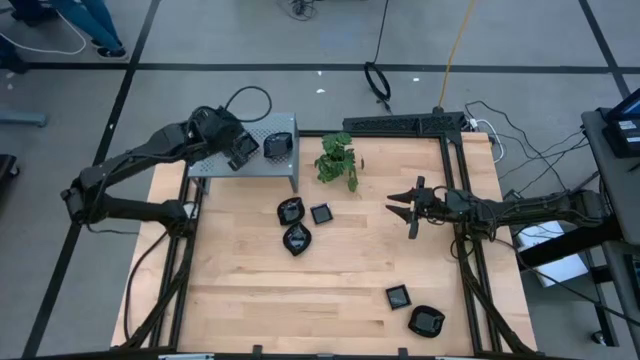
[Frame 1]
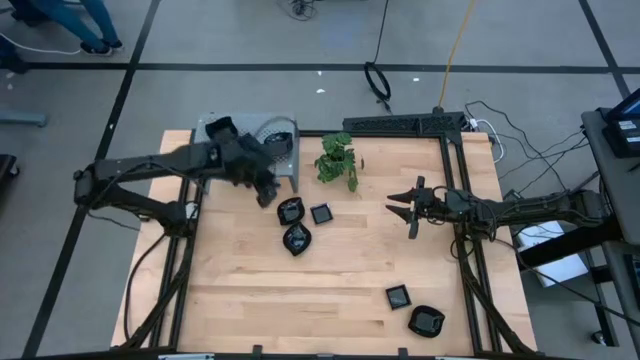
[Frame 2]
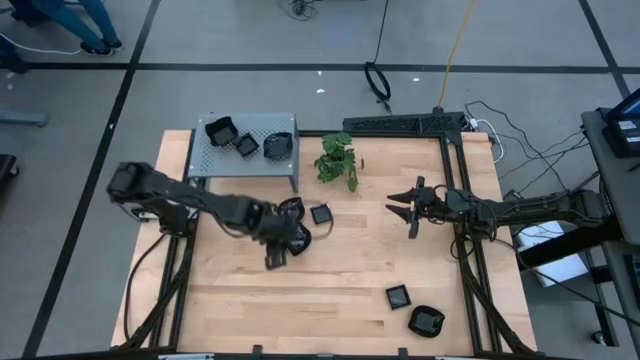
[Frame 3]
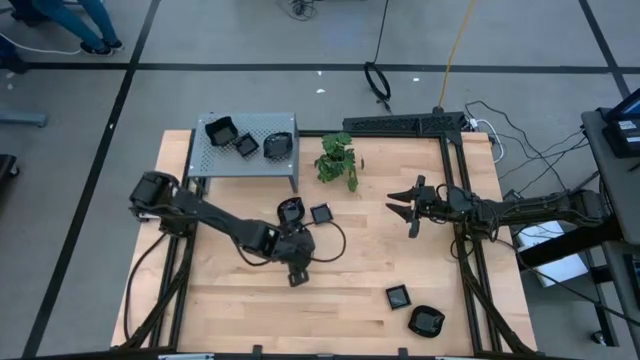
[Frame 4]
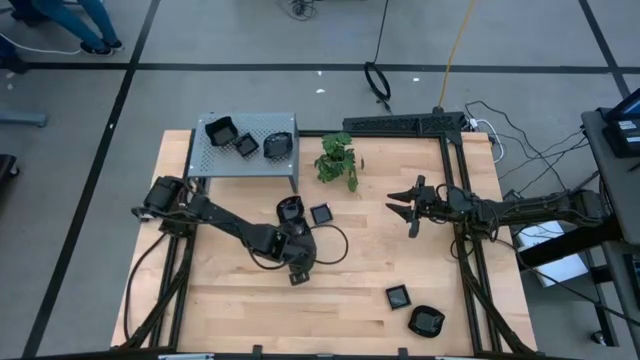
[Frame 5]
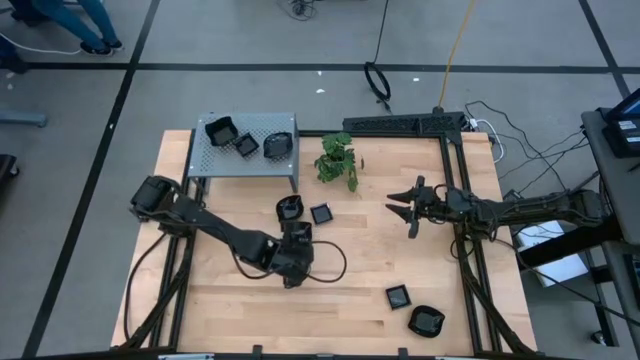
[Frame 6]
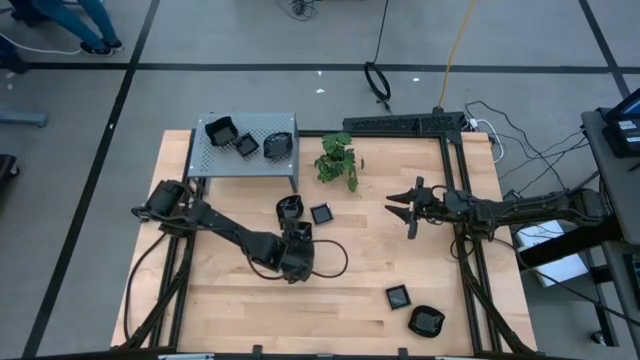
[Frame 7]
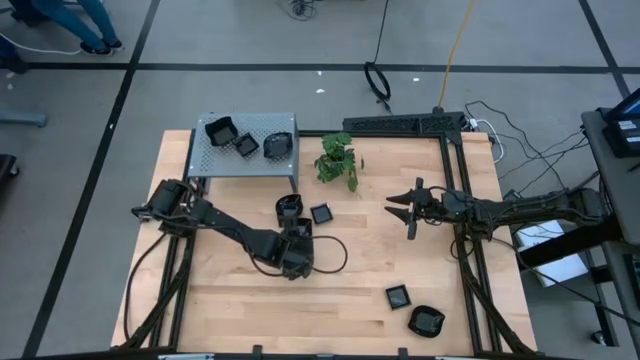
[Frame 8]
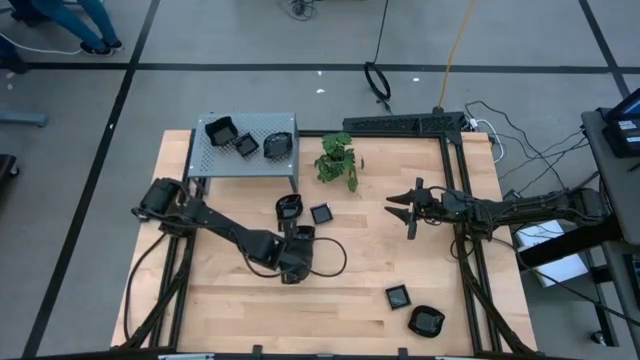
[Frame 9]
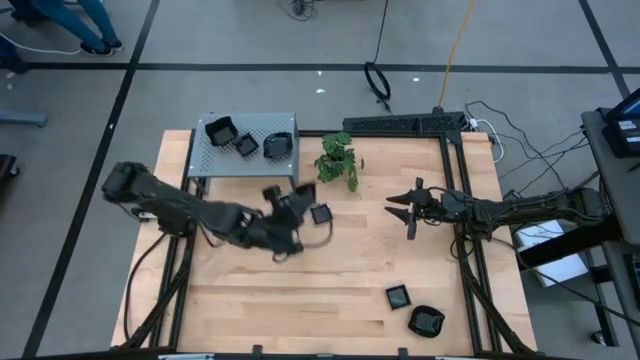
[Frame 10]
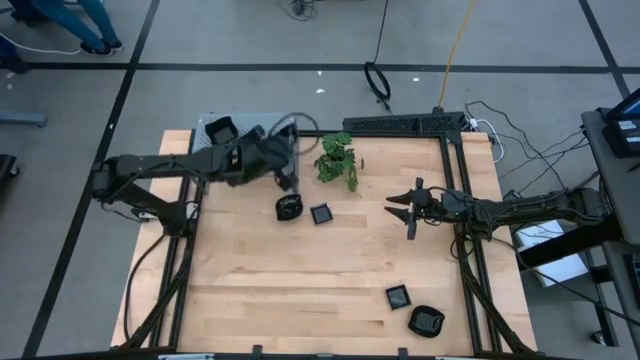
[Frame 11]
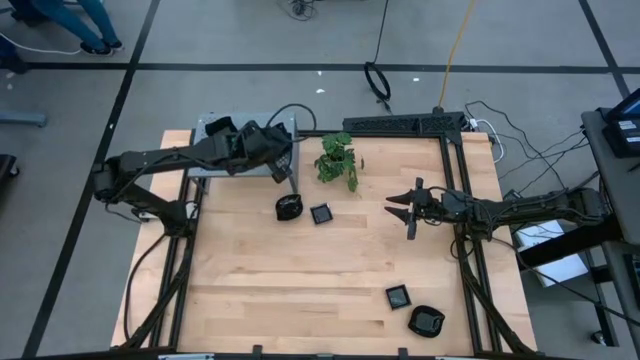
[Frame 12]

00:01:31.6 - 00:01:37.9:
Task: Pick & Place Mini shaped plates
Stack the leaf-shaped plate on top of the leaf-shaped plate on the shelf

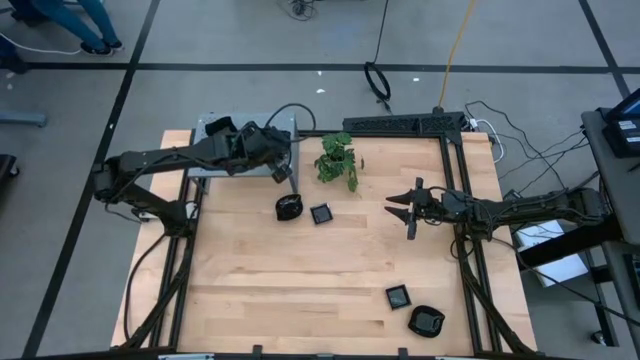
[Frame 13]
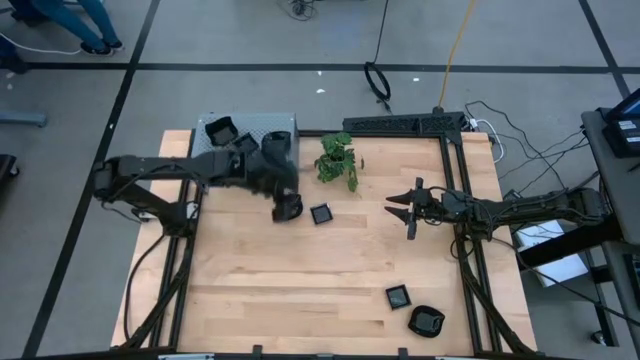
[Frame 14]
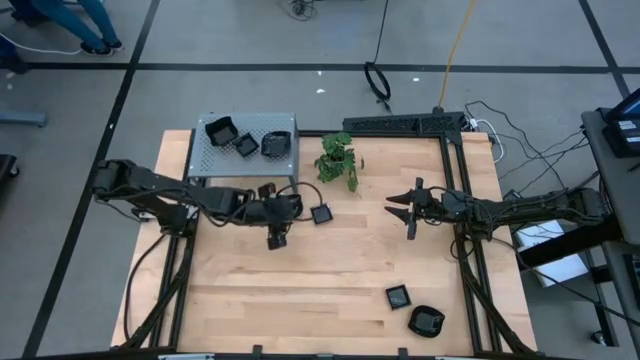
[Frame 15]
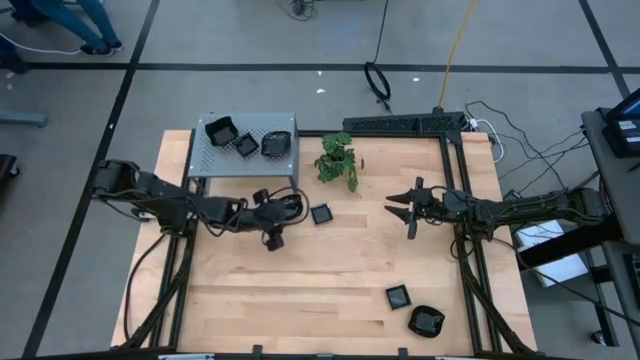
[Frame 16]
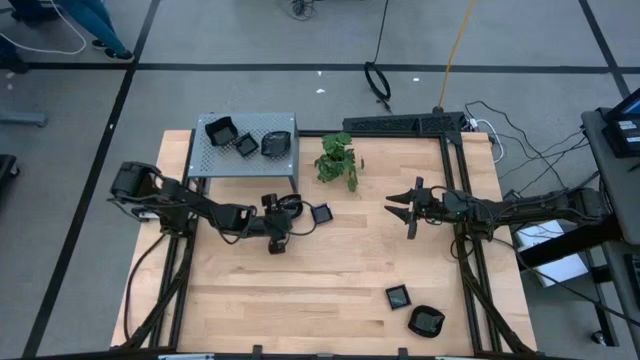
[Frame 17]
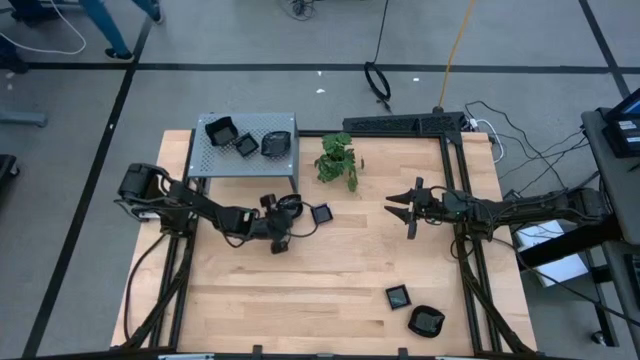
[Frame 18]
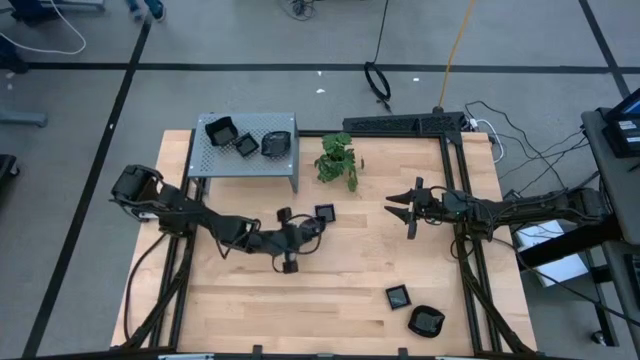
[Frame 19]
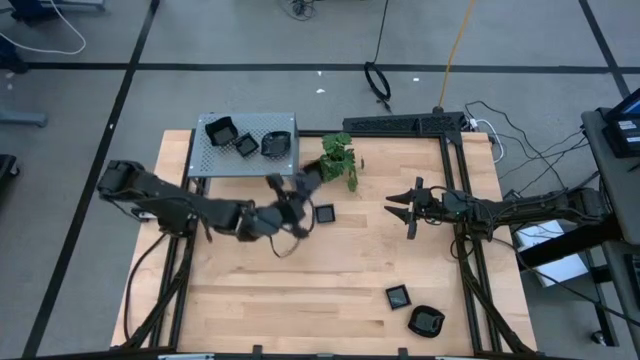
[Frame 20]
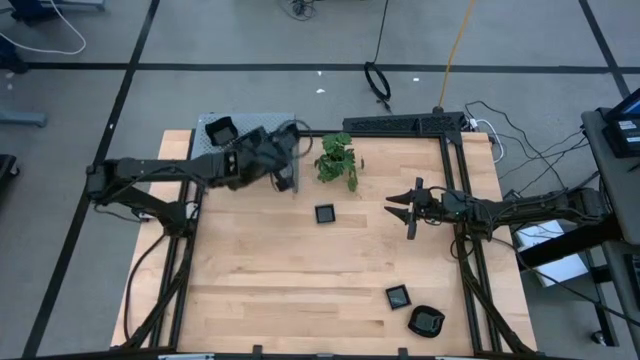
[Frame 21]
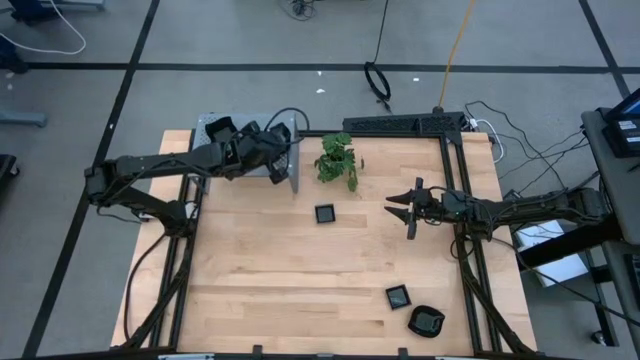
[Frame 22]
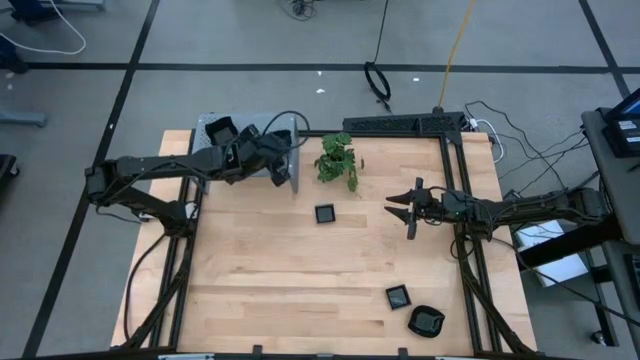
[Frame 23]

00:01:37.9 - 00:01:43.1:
Stack the leaf-shaped plate on top of the leaf-shaped plate on the shelf

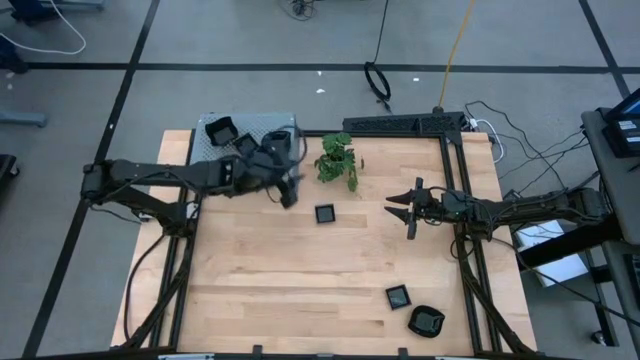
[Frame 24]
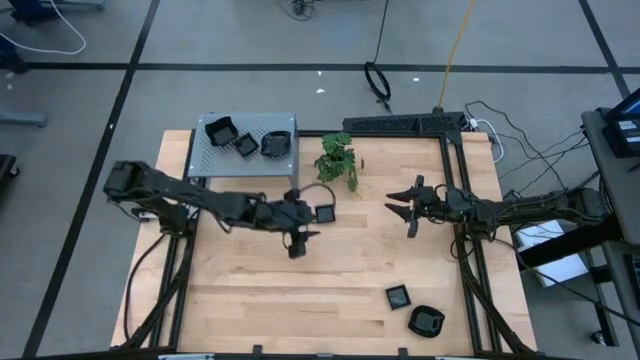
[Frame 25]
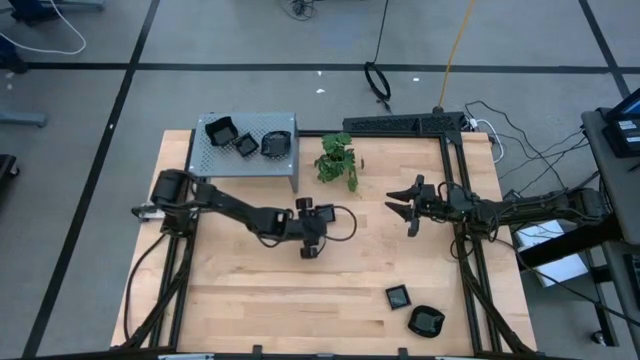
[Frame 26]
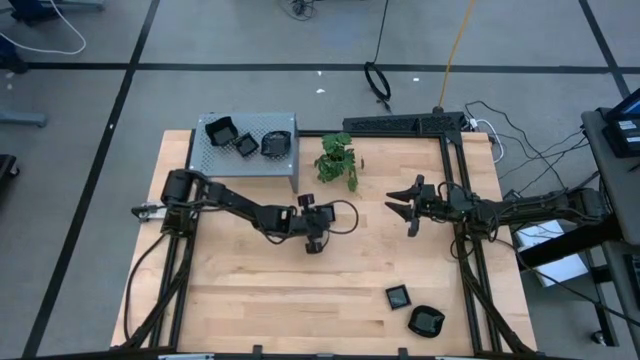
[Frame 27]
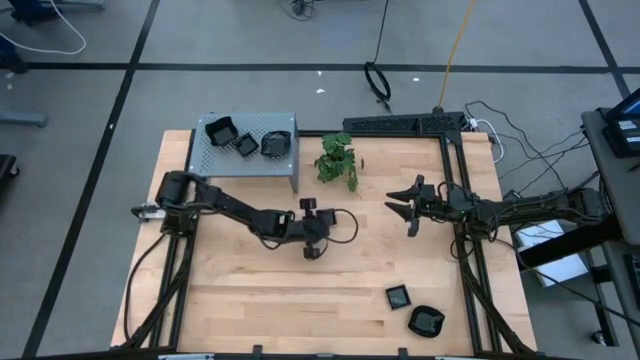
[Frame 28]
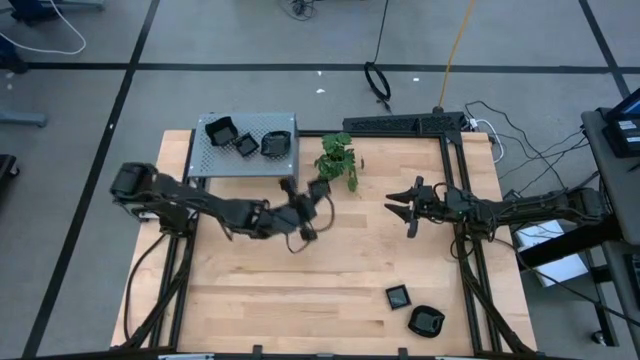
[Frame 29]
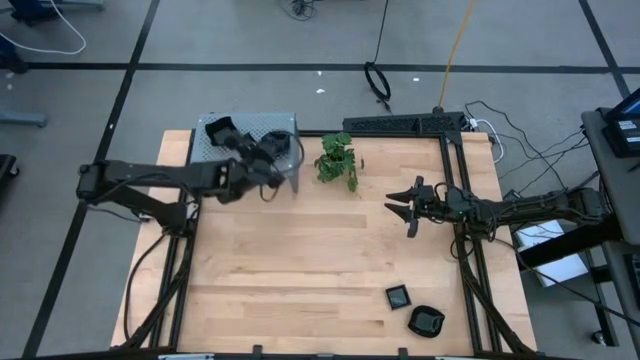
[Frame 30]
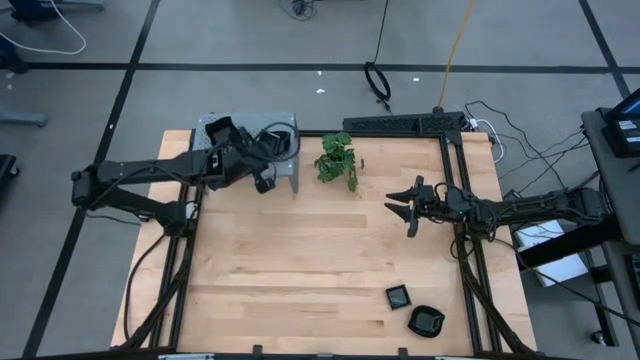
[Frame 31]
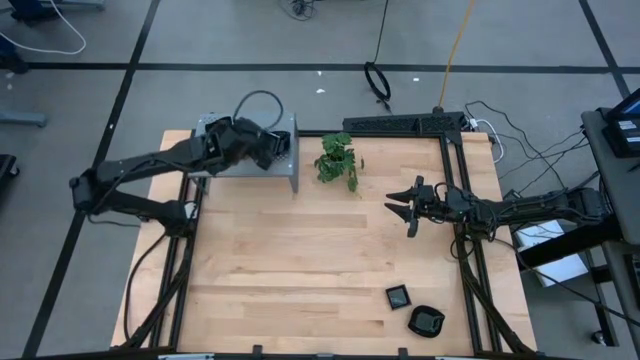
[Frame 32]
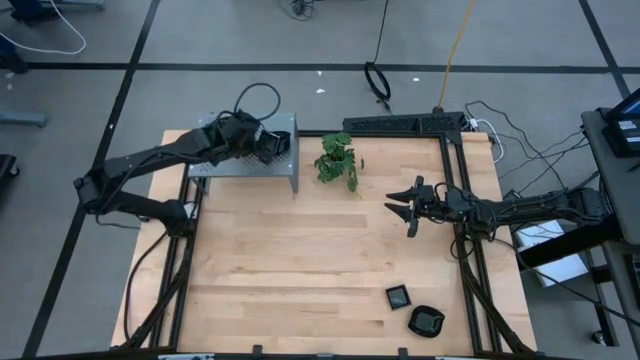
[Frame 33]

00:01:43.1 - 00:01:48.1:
Stack the square plate on top of the square plate on the shelf

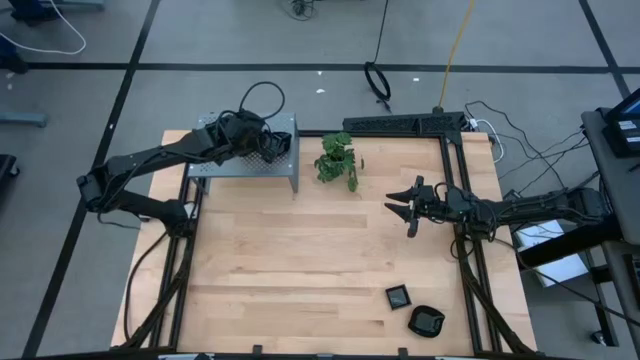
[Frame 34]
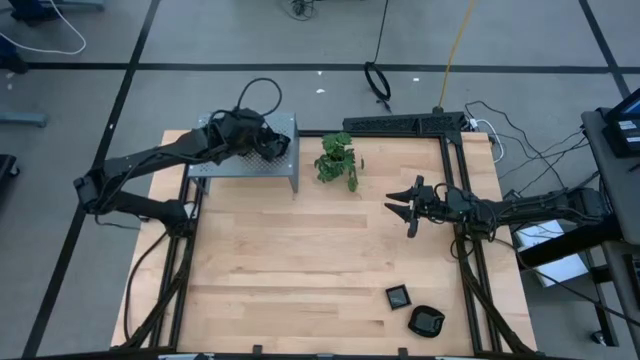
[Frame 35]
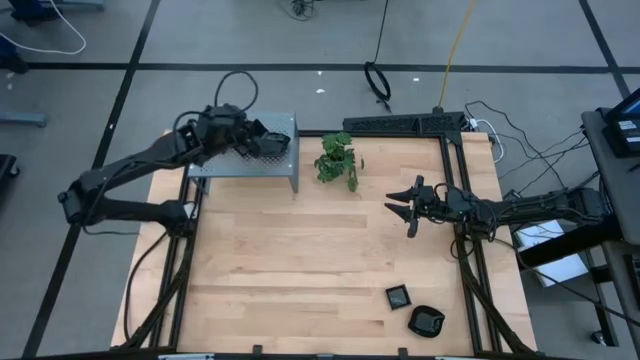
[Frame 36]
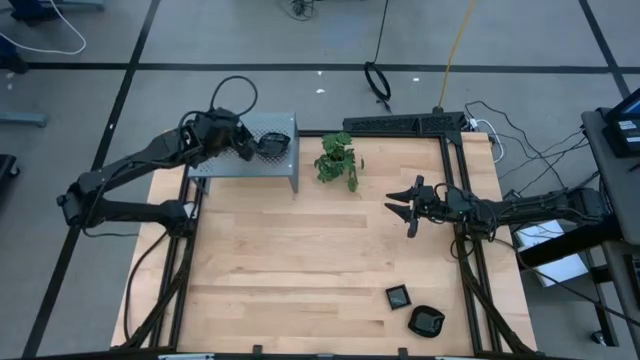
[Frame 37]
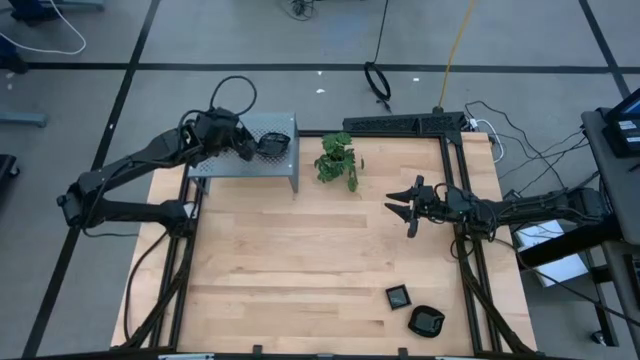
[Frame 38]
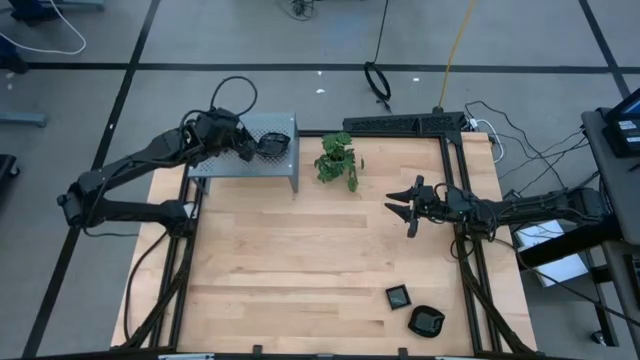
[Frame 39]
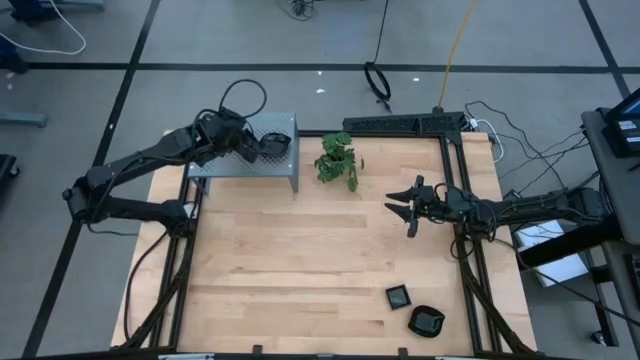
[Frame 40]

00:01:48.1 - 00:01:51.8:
Stack the square plate on top of the square plate on the shelf

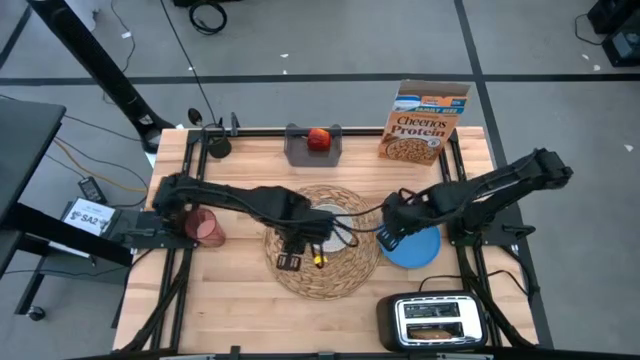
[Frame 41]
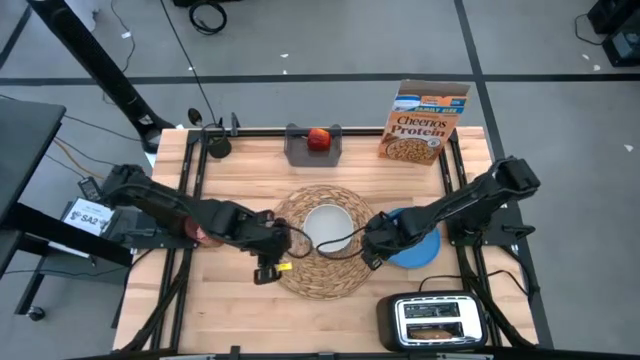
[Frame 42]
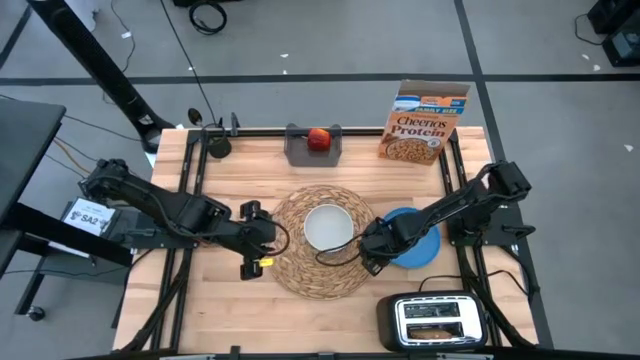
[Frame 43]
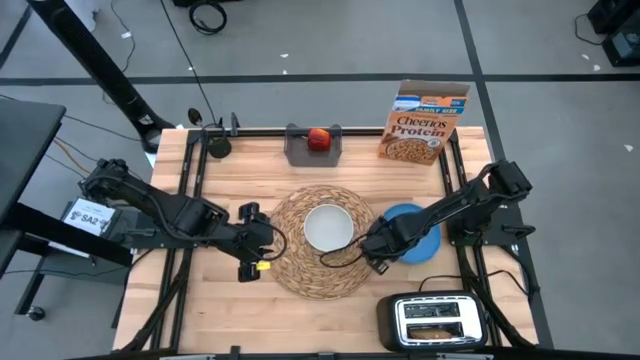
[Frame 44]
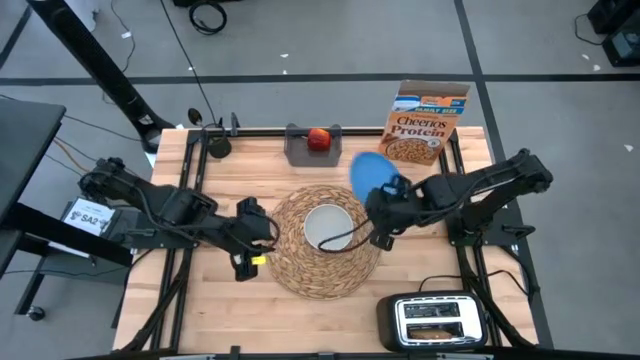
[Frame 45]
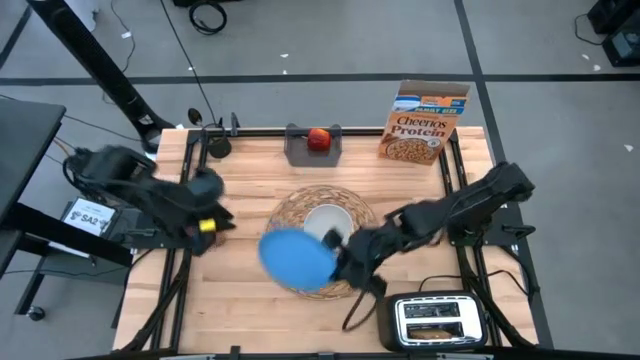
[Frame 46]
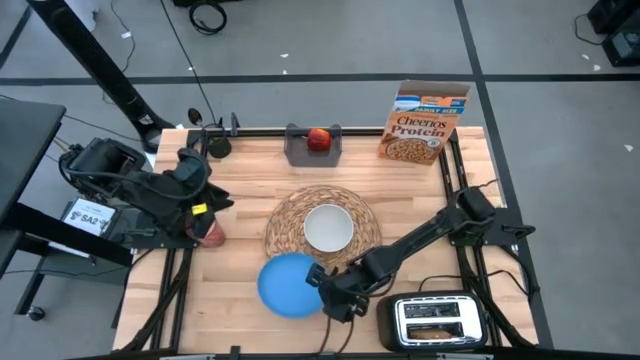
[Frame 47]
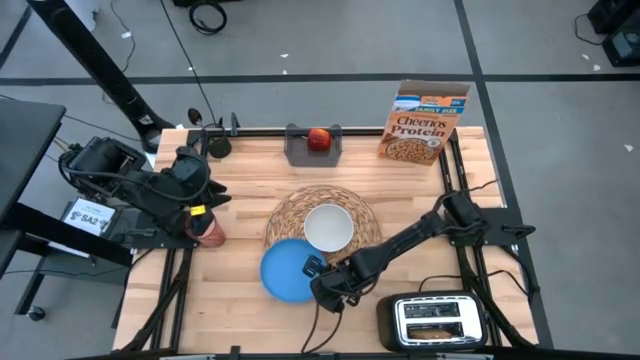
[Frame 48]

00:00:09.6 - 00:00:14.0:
Task: Arrange a breakfast setting
Put the blue plate on the brown table mat to the bottom left of the white bowl
